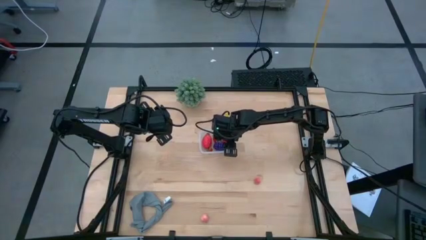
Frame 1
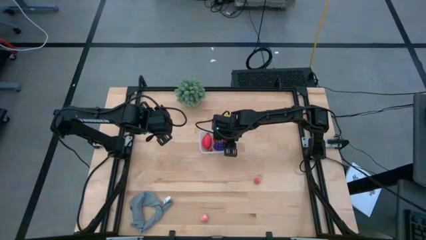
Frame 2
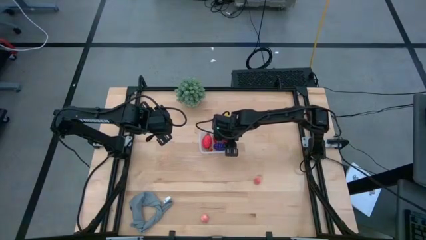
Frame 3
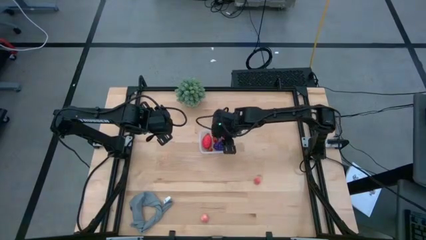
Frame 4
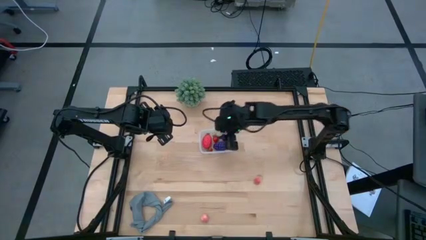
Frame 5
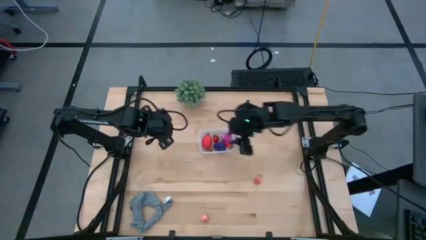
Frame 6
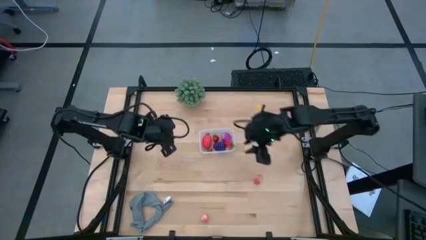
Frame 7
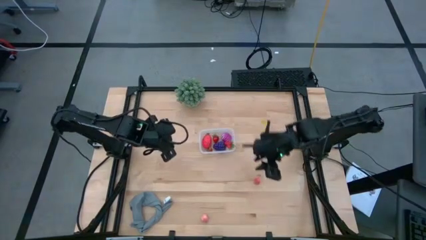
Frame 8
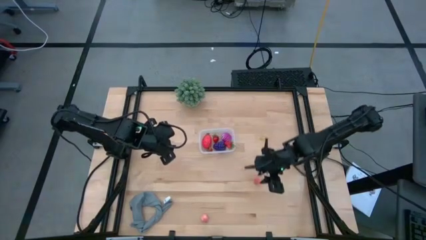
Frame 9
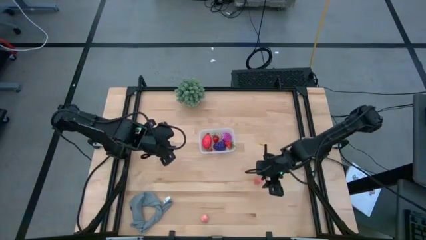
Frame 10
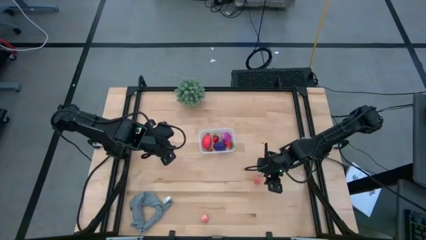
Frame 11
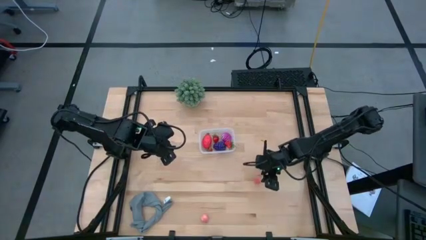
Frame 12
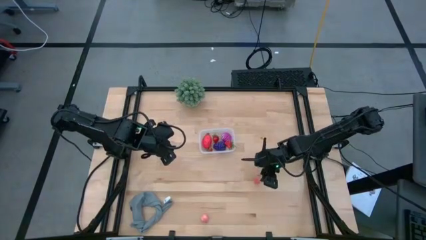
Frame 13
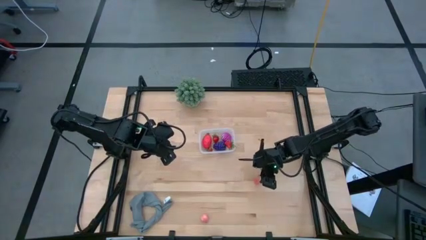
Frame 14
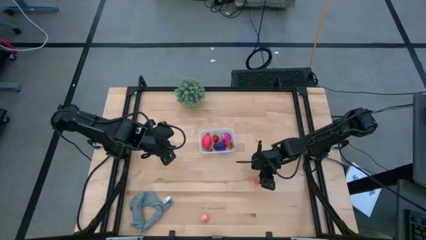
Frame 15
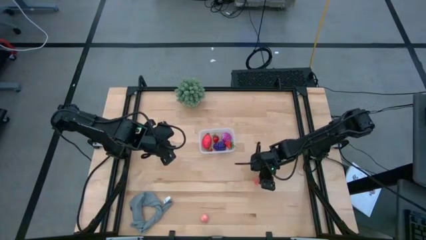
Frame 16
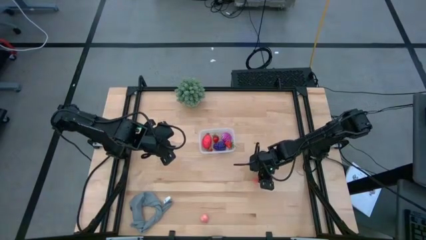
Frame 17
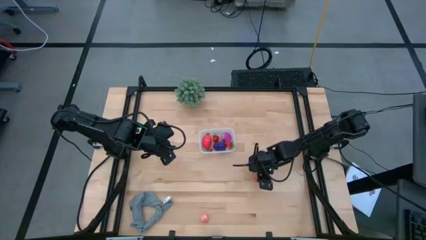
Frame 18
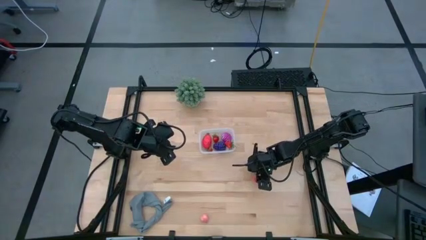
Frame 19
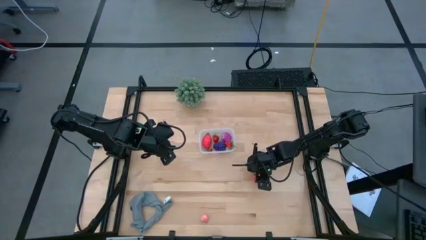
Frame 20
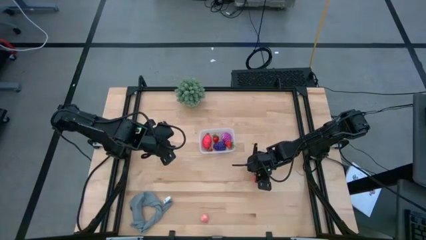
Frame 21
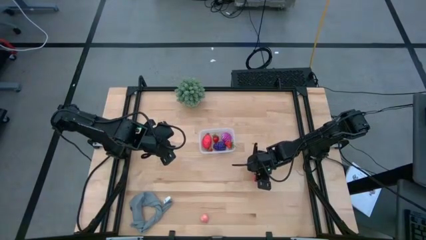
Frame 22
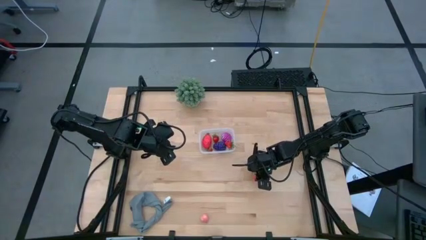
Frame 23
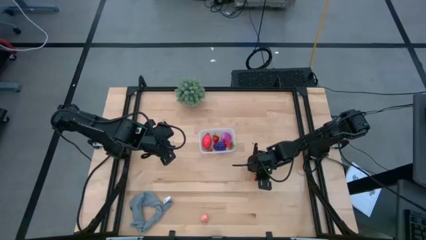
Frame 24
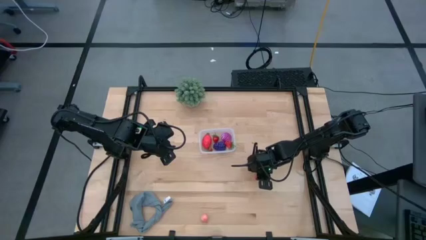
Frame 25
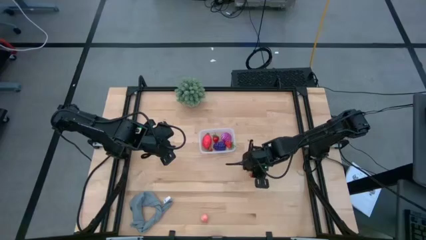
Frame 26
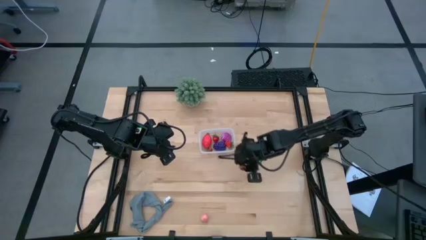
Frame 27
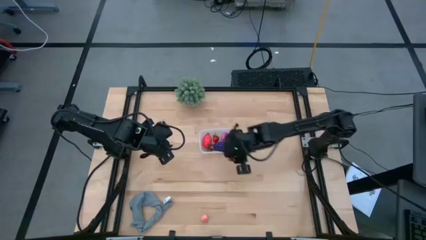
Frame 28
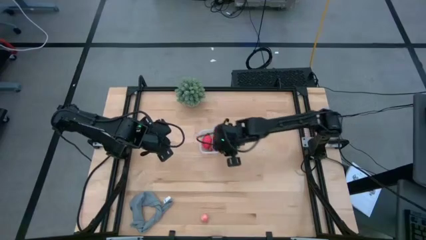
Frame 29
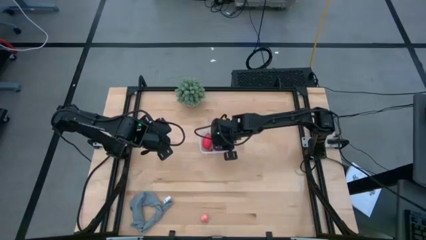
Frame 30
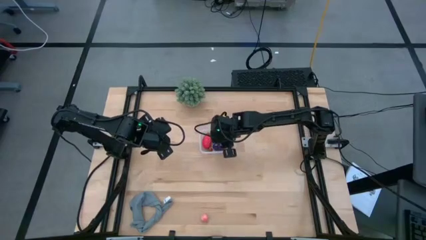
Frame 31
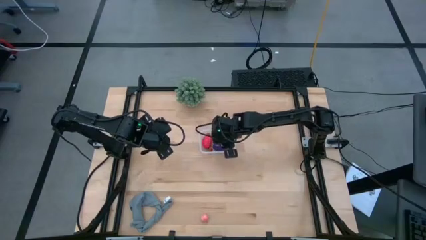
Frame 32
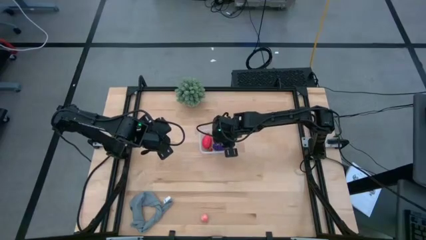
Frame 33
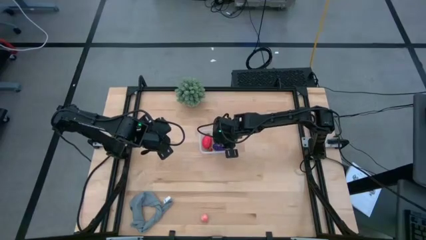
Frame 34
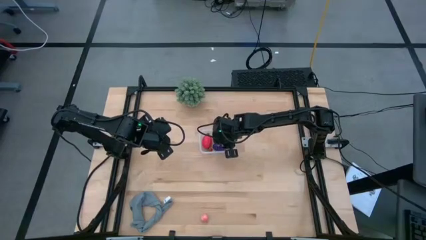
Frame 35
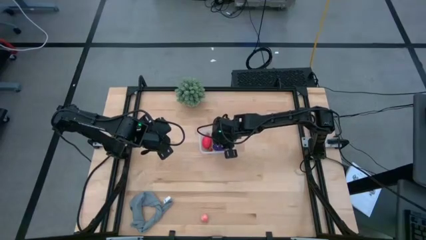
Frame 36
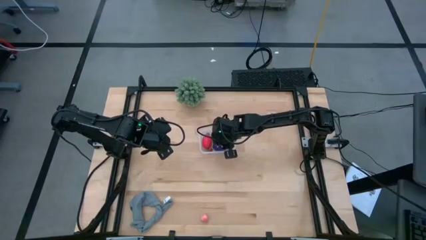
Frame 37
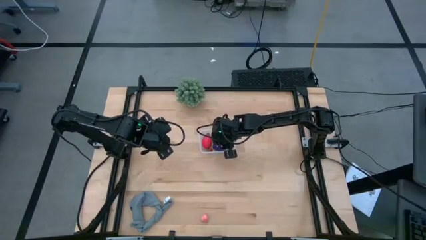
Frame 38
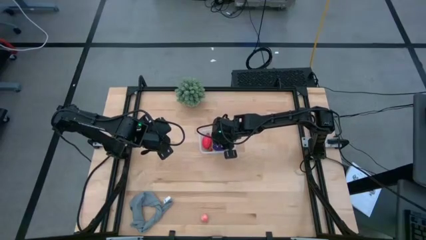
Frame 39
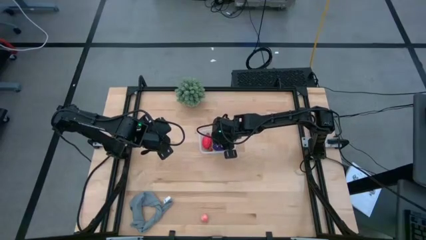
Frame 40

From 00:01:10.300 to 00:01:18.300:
Task: Pick and placing Produce into tupperware
Put the top peach into the bin

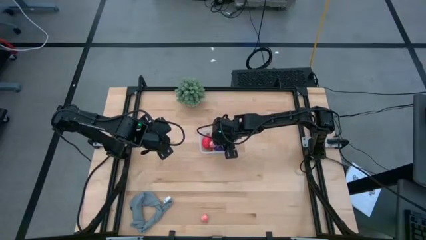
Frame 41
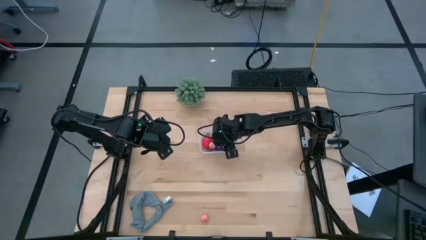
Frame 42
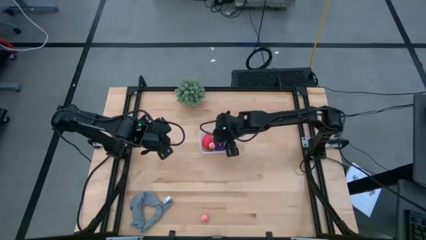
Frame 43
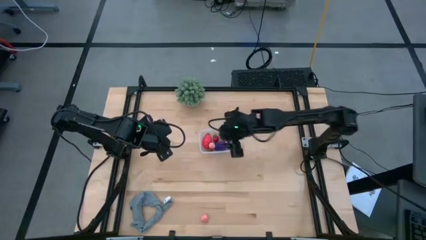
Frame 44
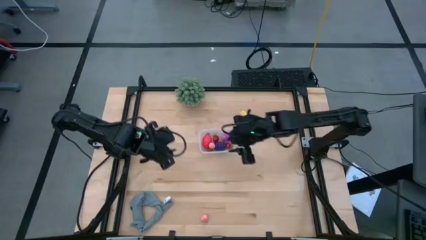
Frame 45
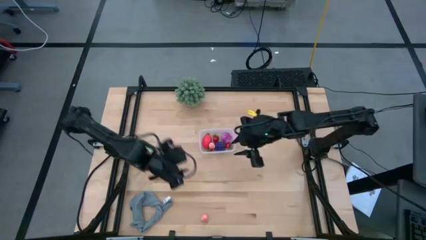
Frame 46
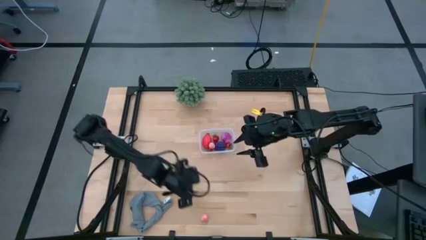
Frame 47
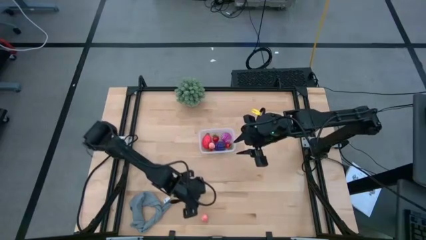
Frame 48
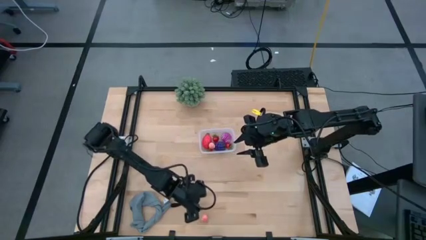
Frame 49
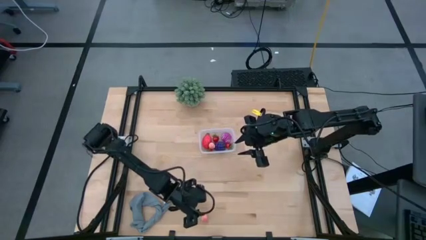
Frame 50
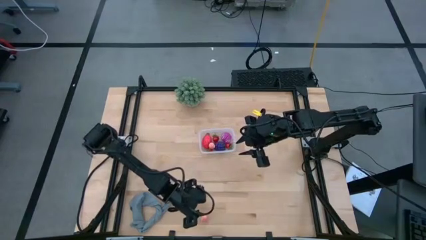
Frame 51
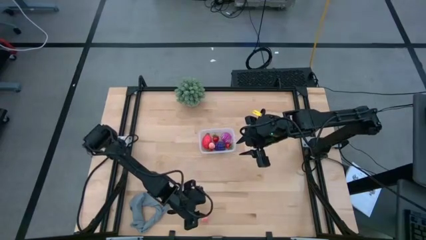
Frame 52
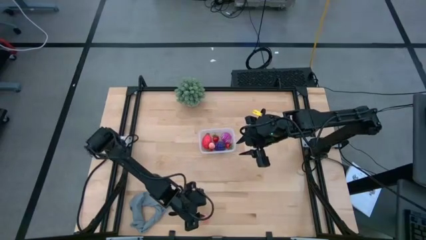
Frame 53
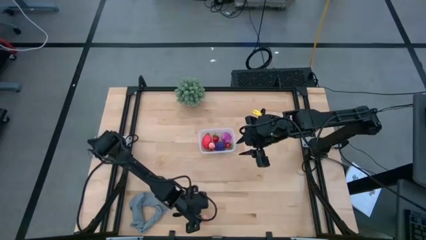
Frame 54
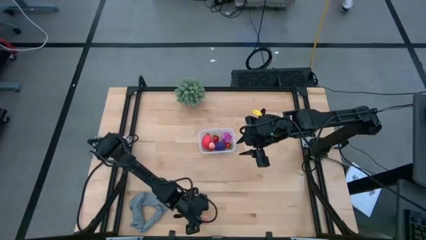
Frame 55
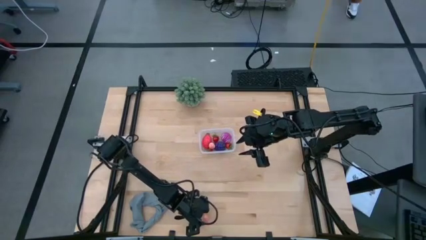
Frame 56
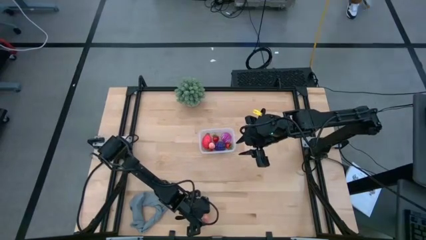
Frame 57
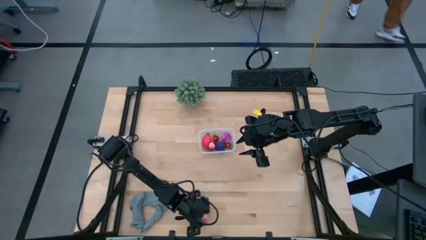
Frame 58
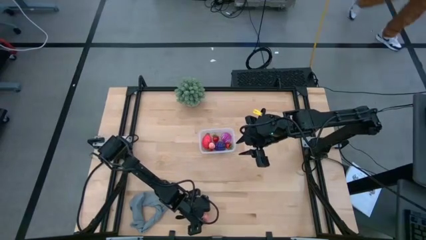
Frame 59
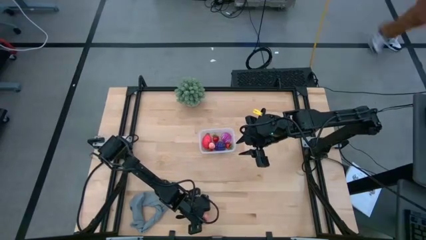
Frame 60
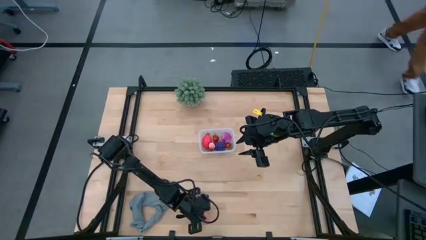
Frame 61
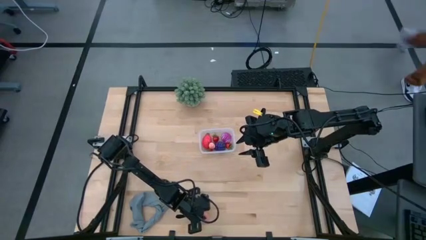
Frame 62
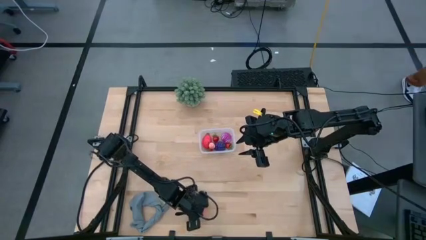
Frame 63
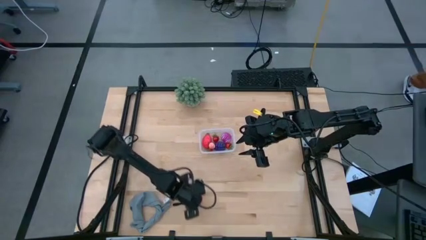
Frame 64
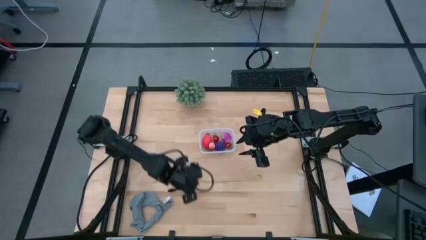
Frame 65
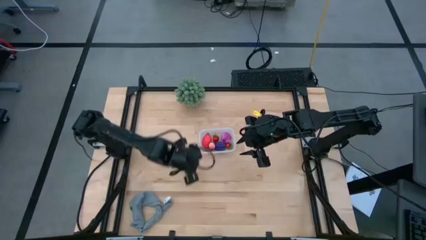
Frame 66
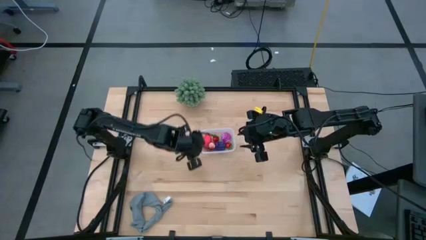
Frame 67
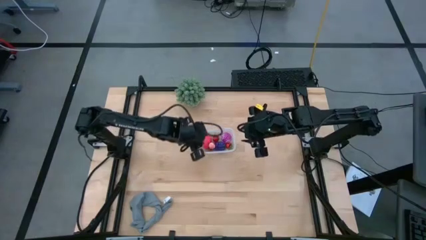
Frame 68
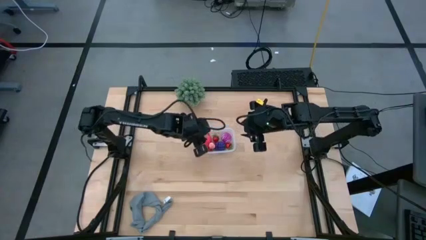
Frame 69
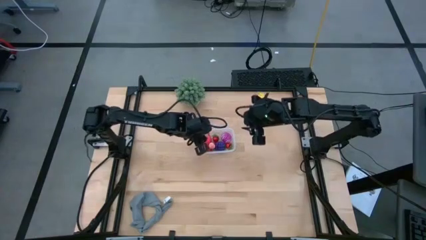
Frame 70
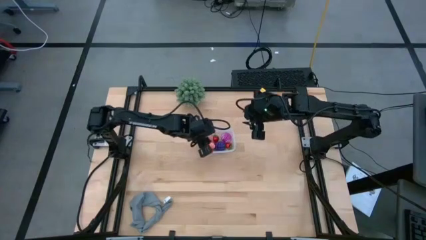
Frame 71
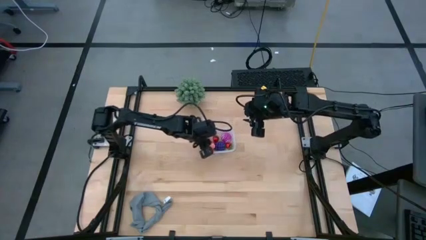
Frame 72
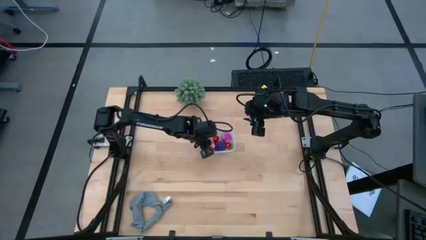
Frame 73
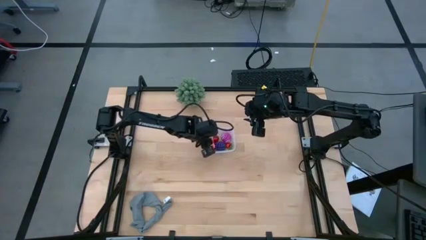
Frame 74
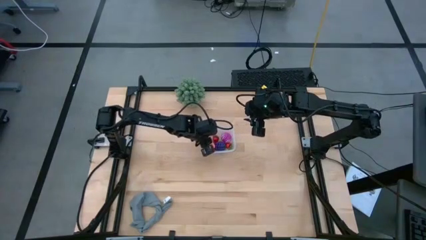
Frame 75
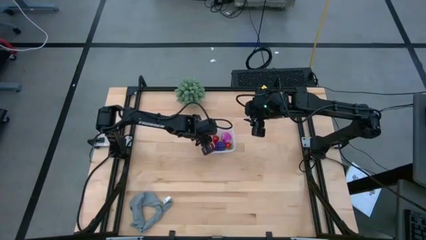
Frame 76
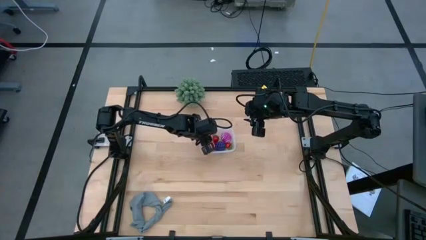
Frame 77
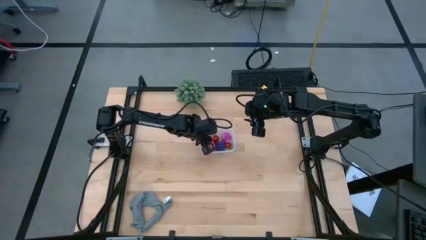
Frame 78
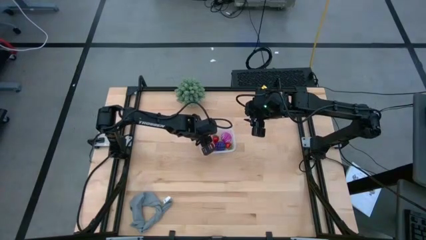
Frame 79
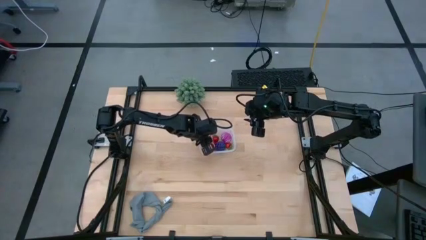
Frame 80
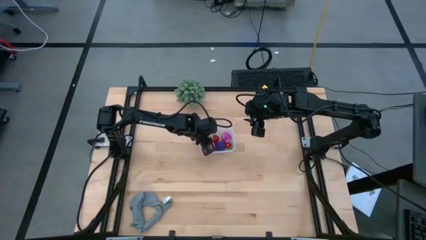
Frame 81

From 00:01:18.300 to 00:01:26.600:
Put the peach into the bin
